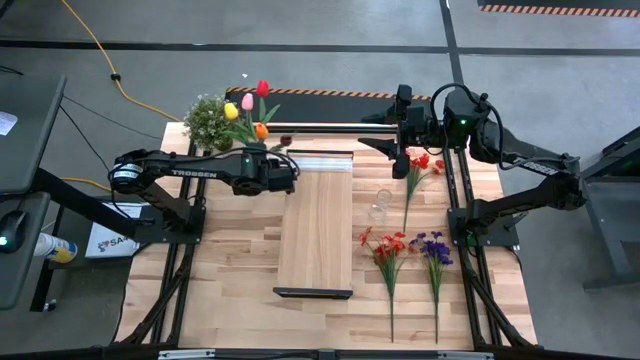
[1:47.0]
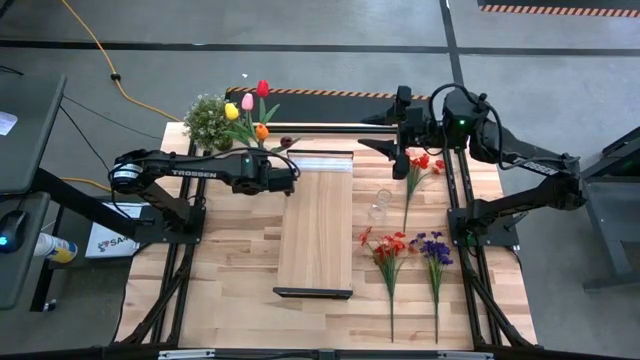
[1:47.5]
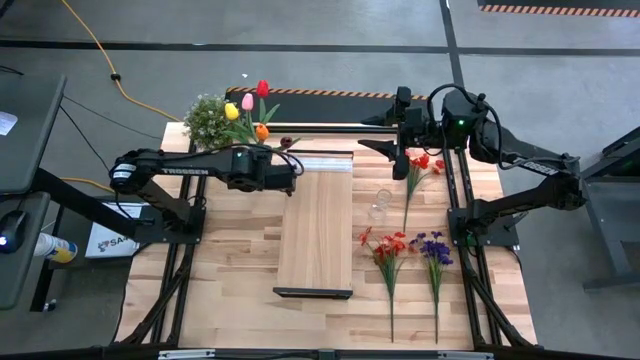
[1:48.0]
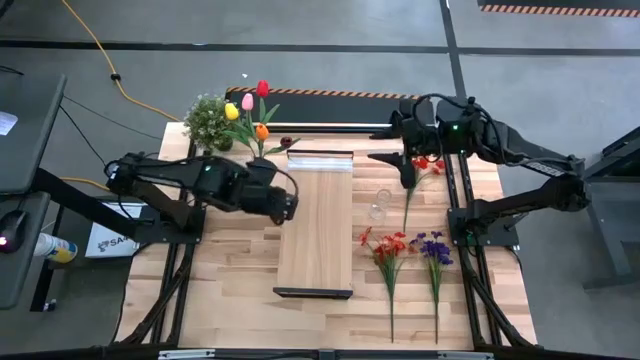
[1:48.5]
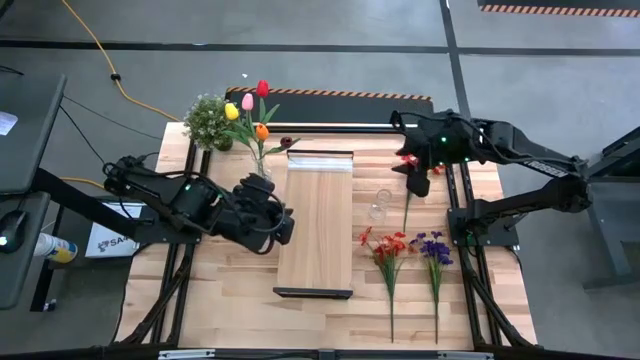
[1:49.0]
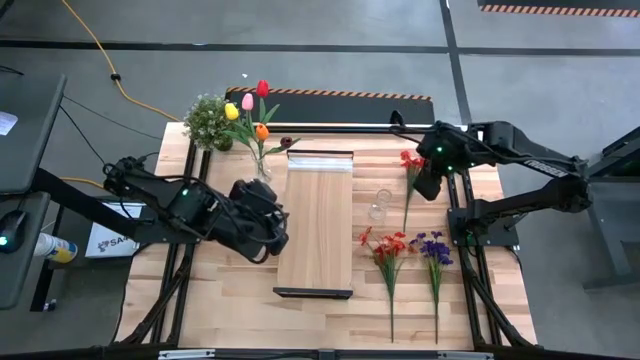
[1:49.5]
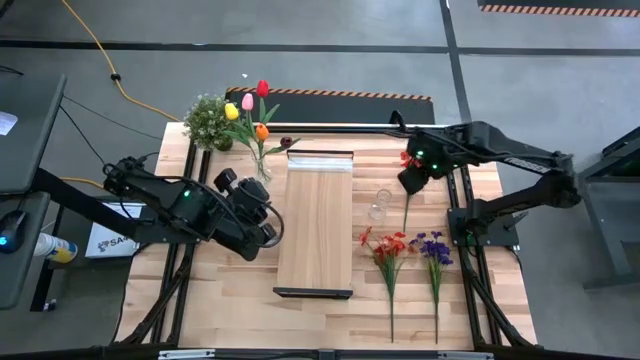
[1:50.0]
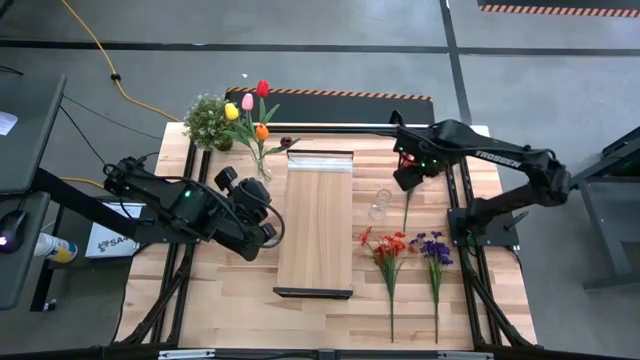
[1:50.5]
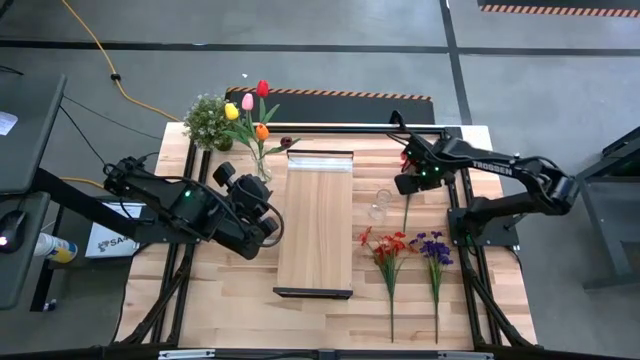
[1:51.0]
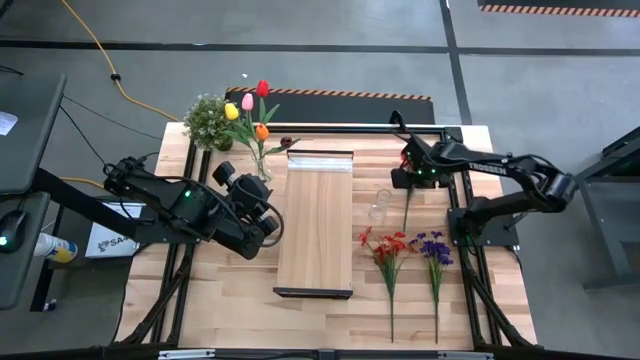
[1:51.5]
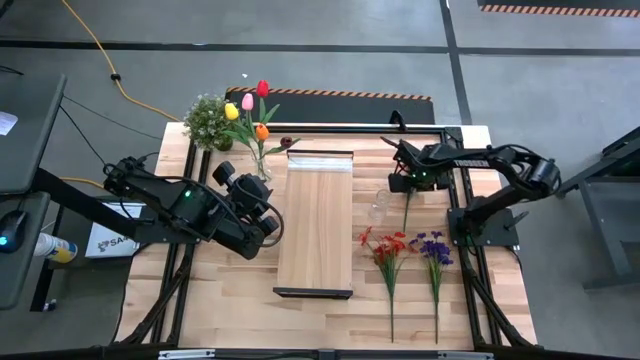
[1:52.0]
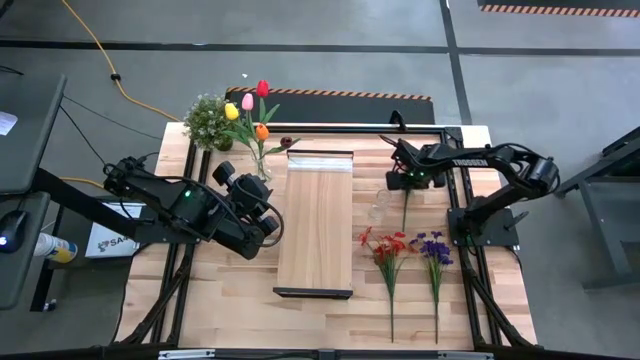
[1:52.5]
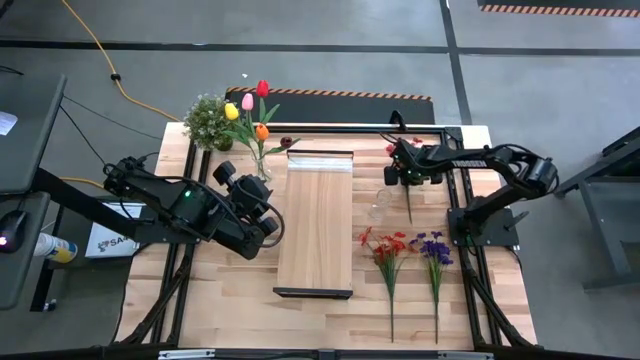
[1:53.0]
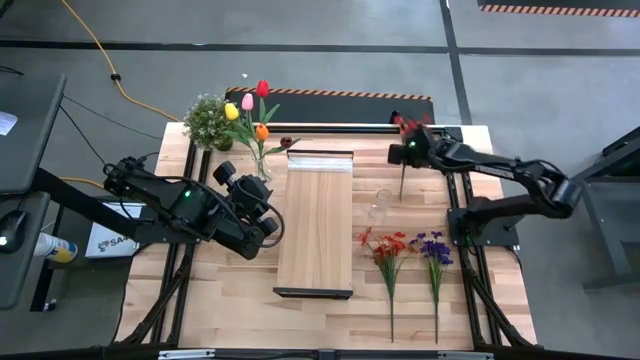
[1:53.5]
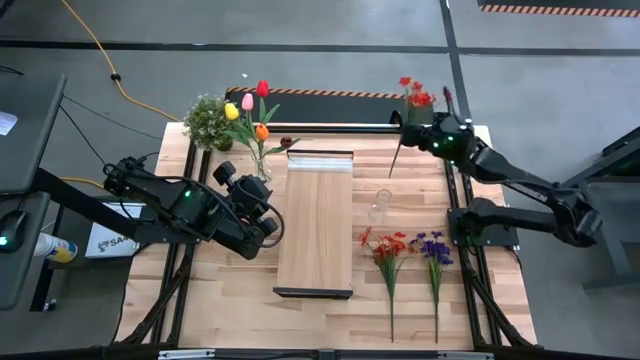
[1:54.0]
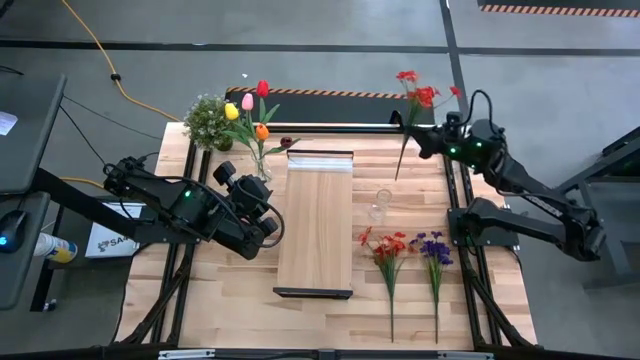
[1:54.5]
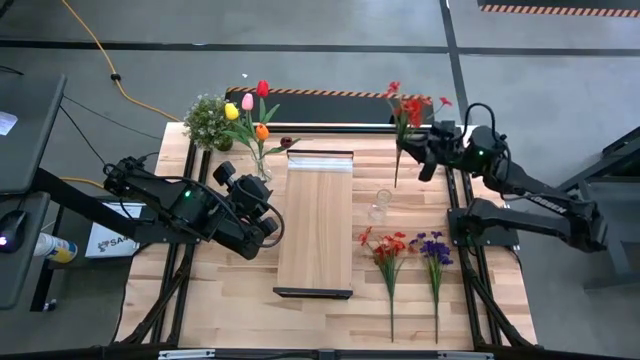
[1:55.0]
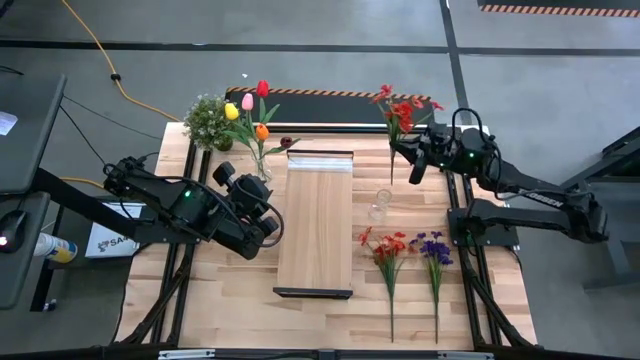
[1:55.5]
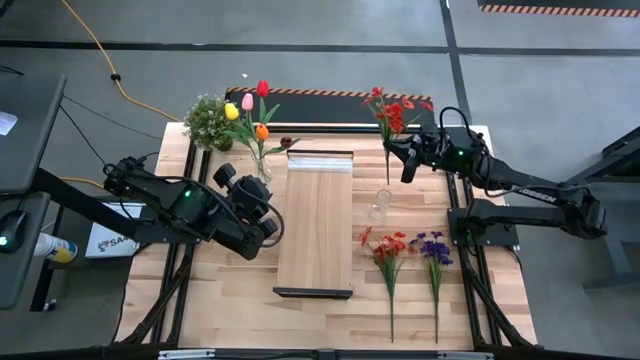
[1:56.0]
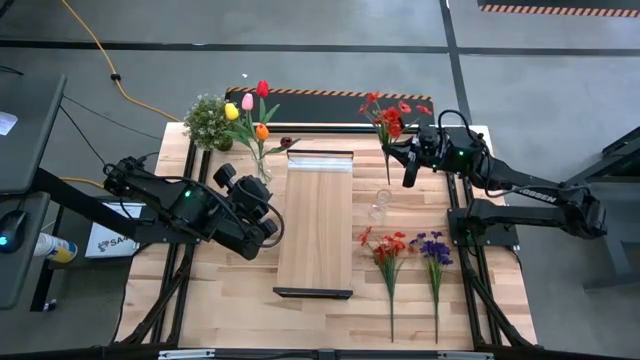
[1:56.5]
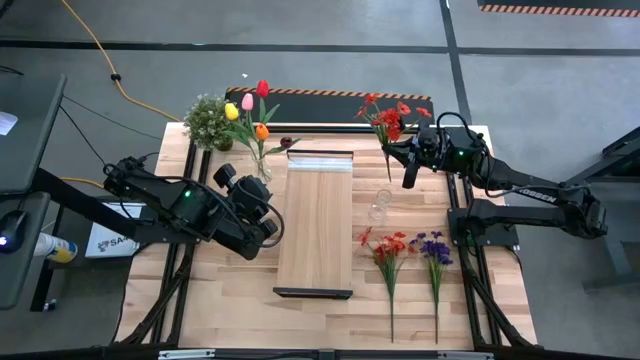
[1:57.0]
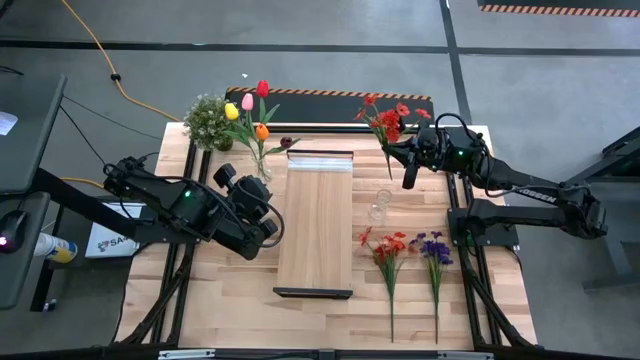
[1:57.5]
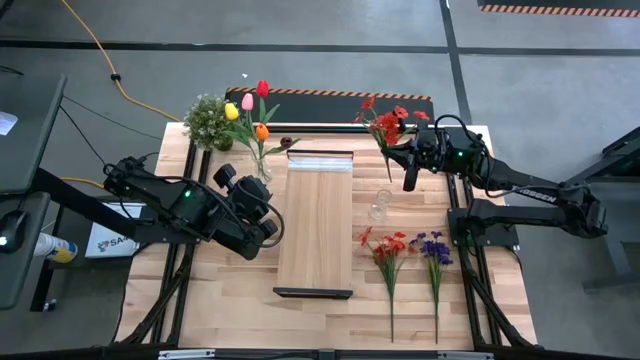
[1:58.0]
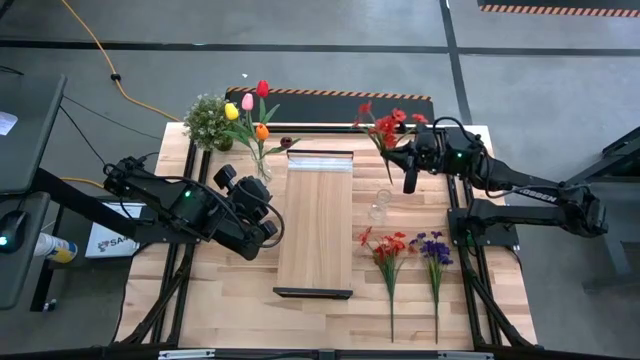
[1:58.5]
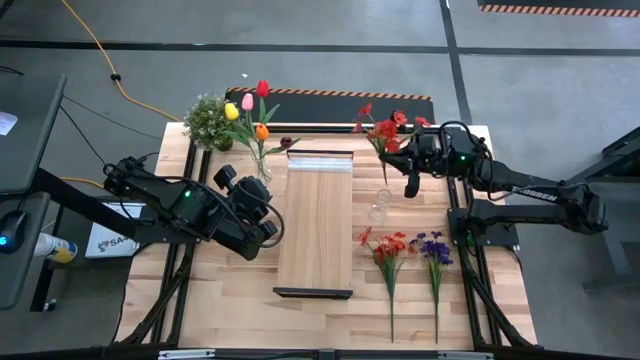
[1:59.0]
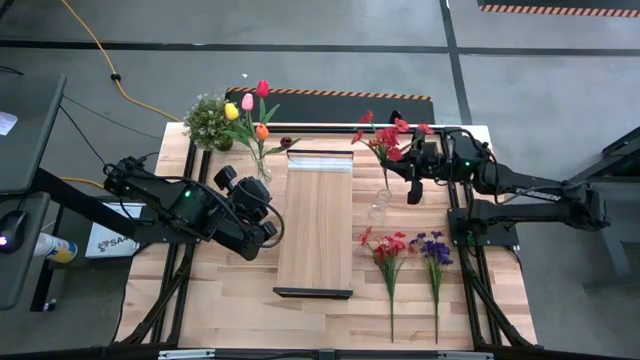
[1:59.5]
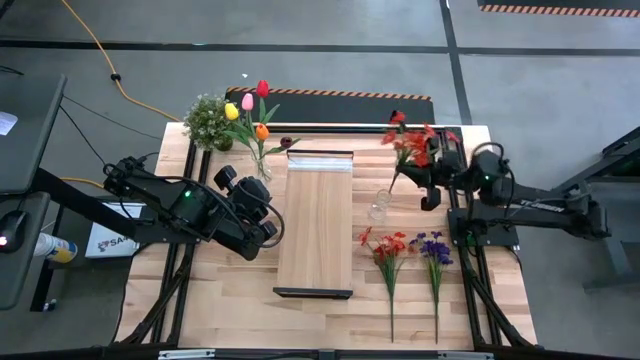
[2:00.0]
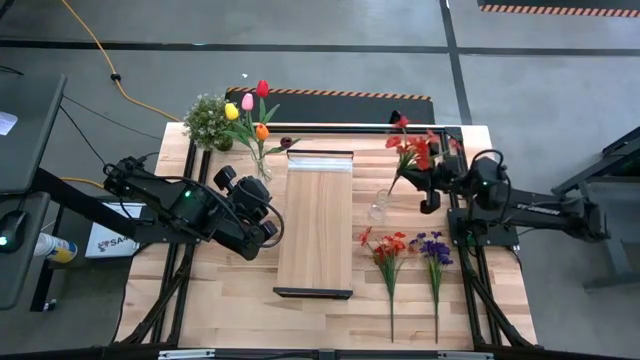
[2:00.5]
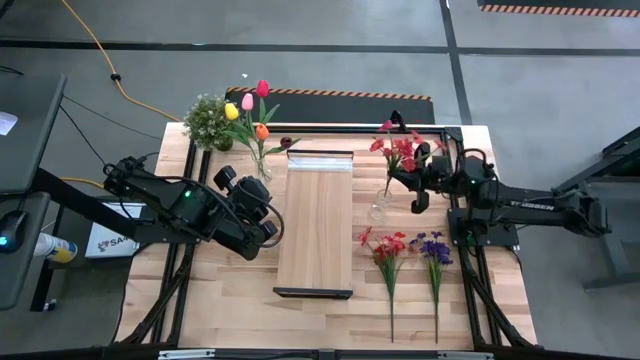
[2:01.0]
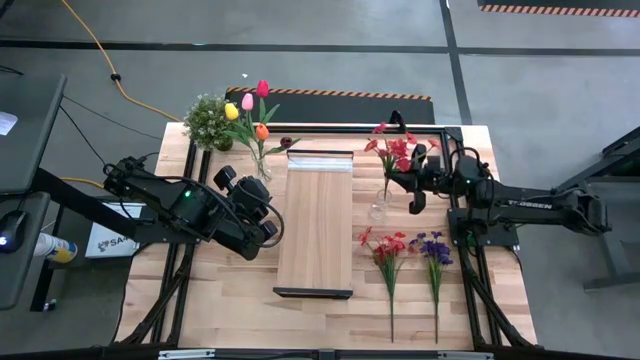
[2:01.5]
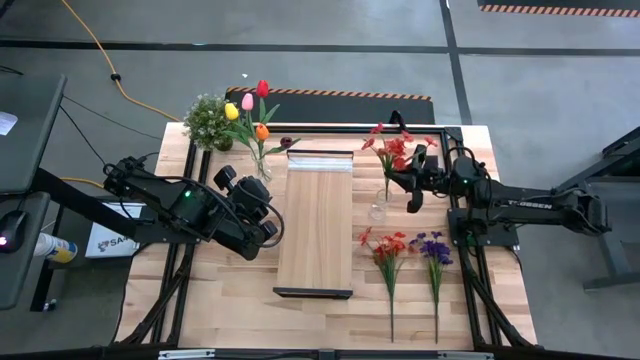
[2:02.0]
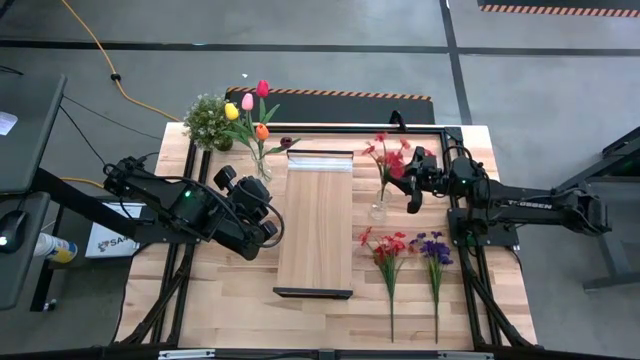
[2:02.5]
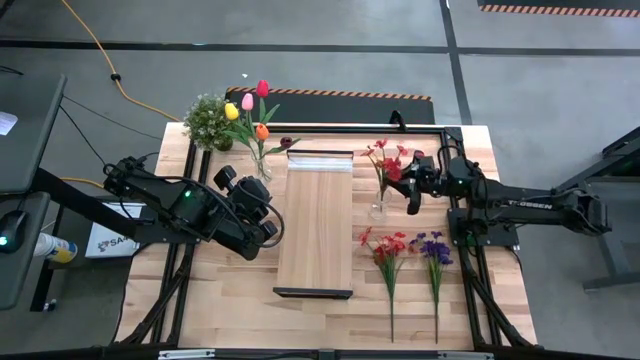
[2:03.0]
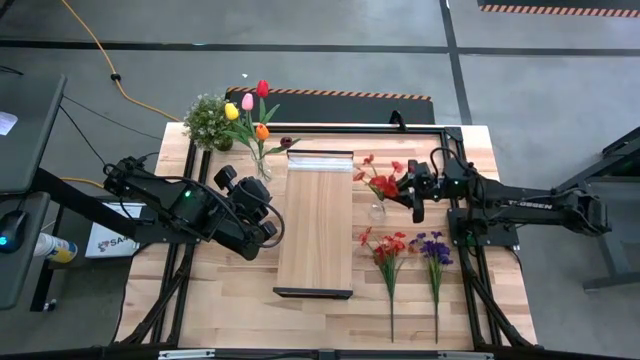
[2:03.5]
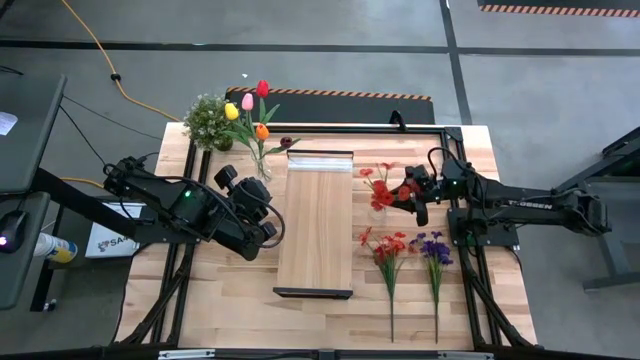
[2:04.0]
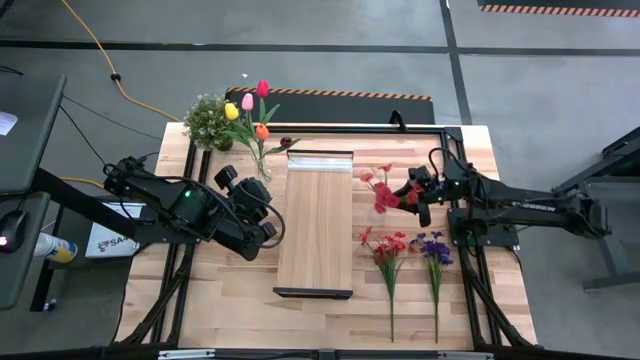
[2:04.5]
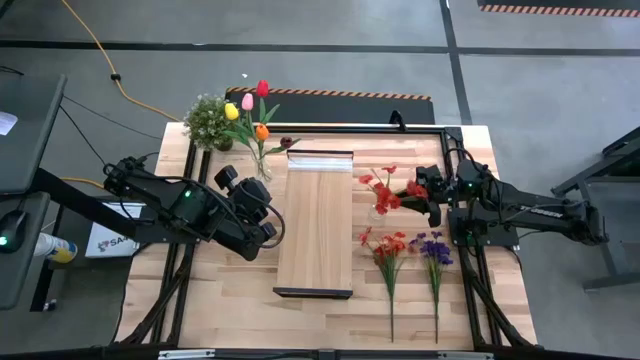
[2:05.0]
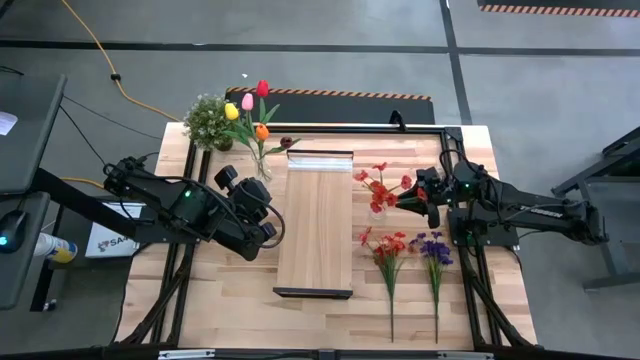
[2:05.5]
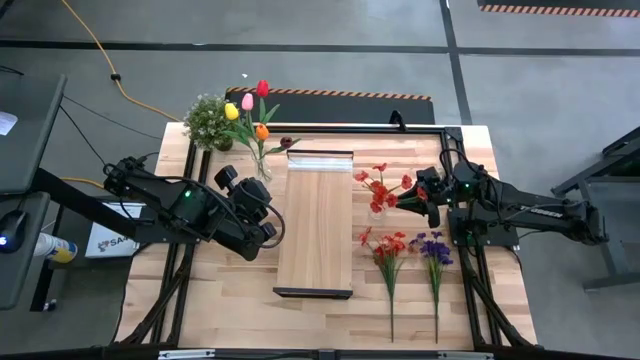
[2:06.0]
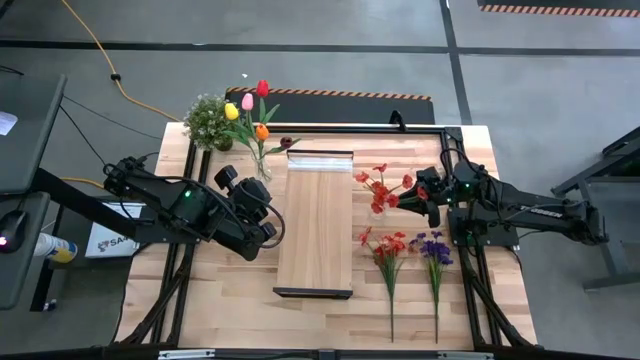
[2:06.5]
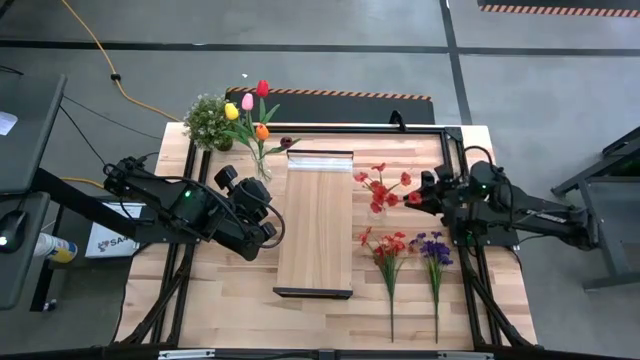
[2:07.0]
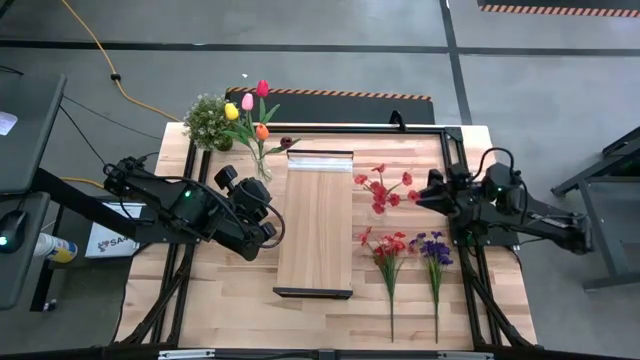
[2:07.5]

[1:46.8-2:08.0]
Task: Pick and place flowers into a vace then onto a shelf
Put the top red flowers into the right vase

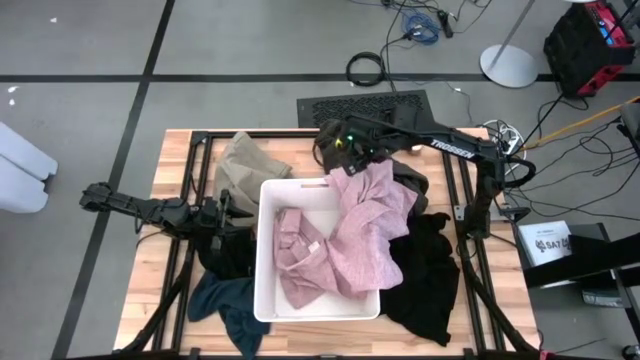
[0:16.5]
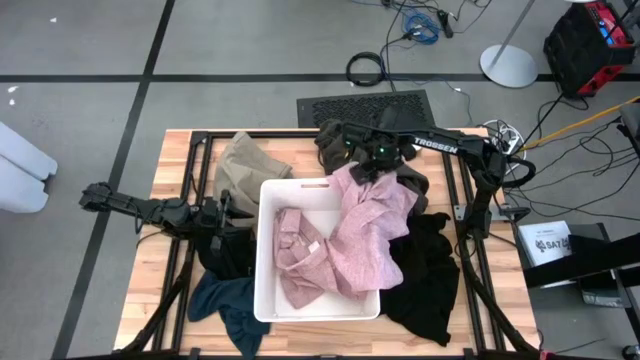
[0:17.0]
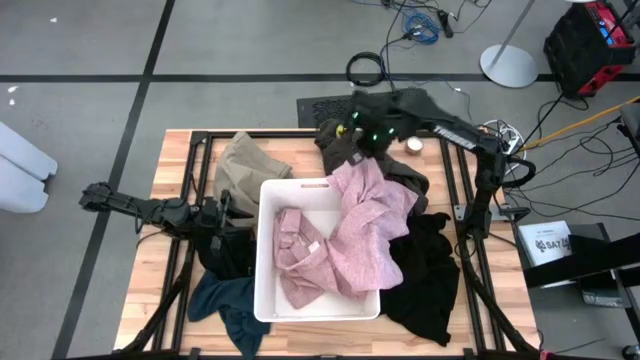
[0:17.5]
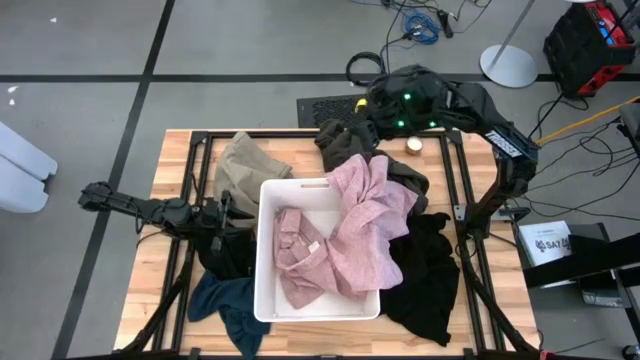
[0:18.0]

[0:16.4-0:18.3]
Task: Sort clothes
Put the pink shirt into the white laundry bin
